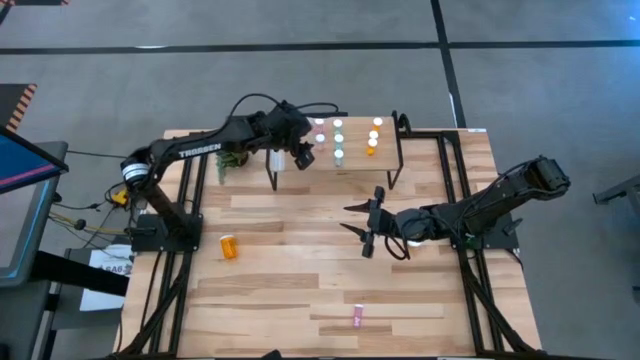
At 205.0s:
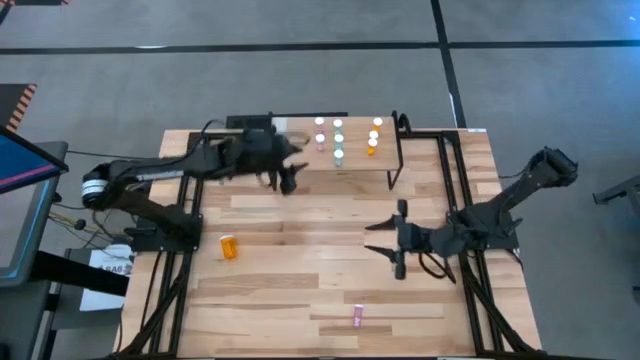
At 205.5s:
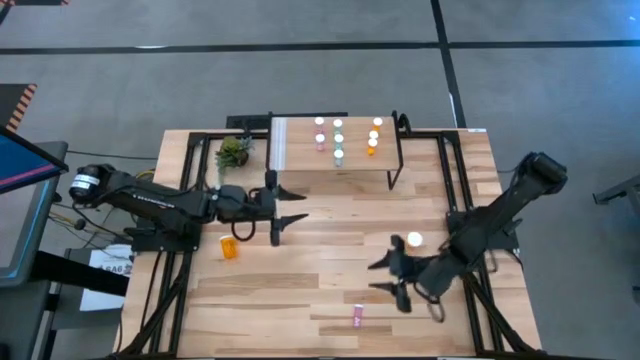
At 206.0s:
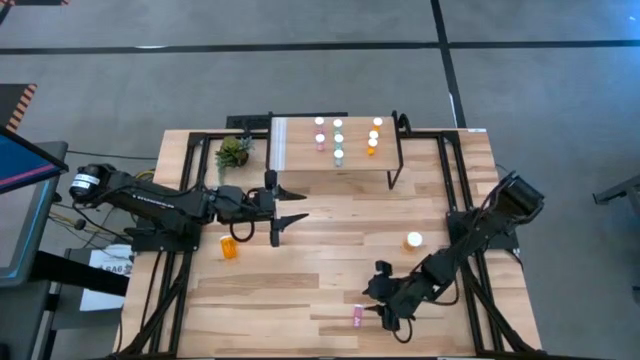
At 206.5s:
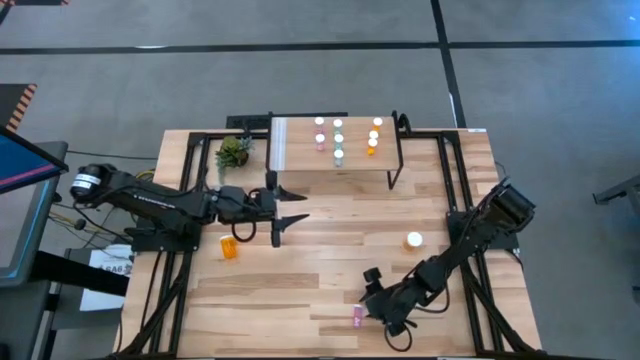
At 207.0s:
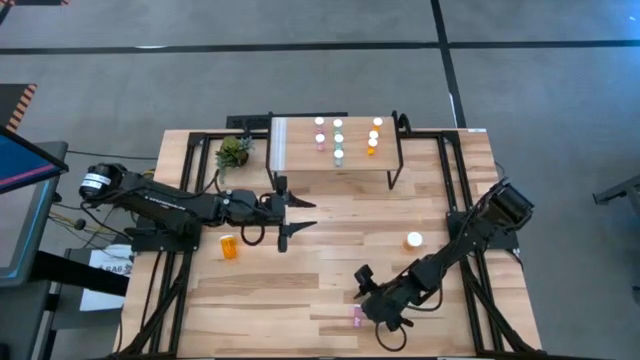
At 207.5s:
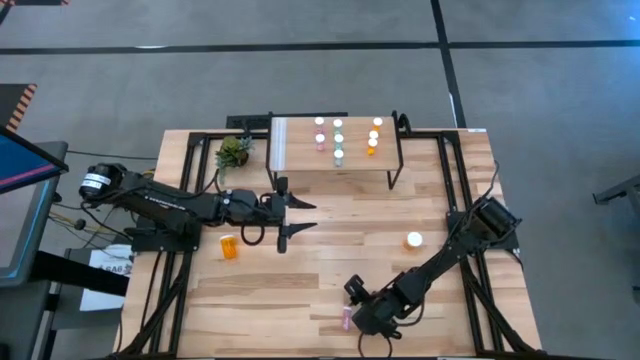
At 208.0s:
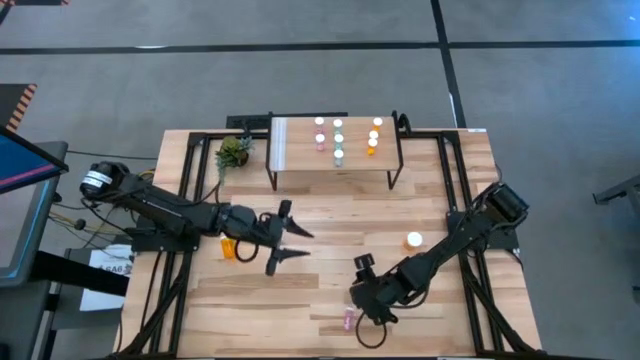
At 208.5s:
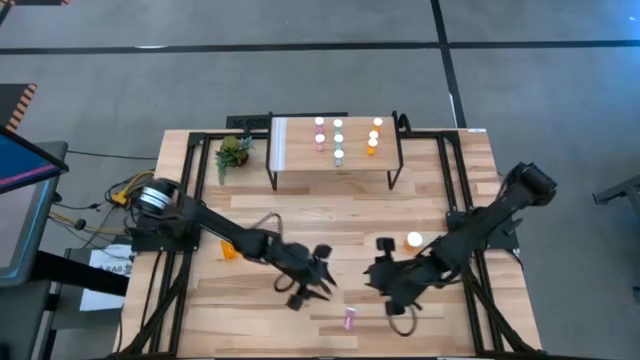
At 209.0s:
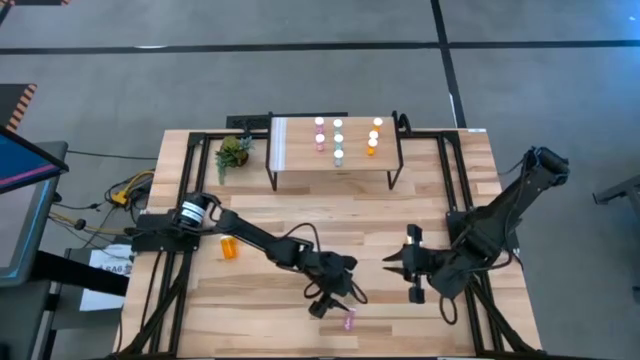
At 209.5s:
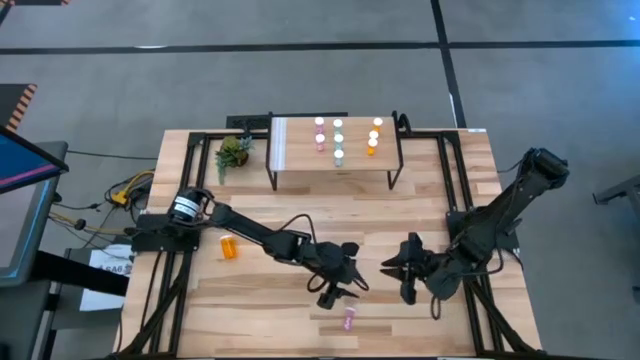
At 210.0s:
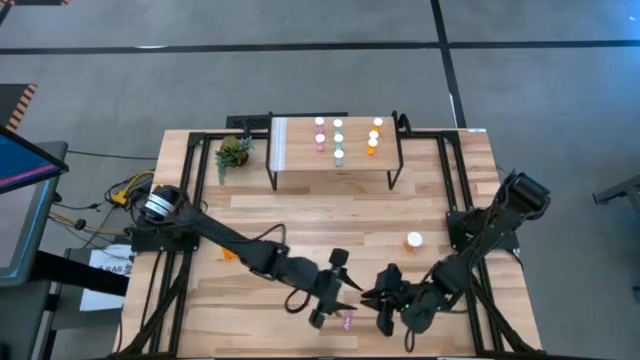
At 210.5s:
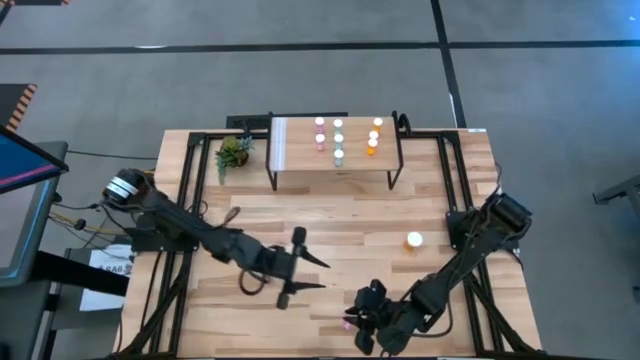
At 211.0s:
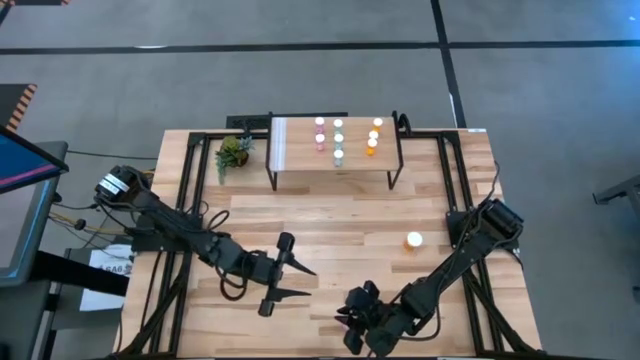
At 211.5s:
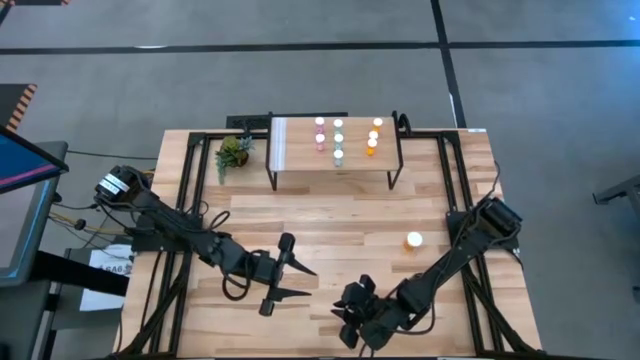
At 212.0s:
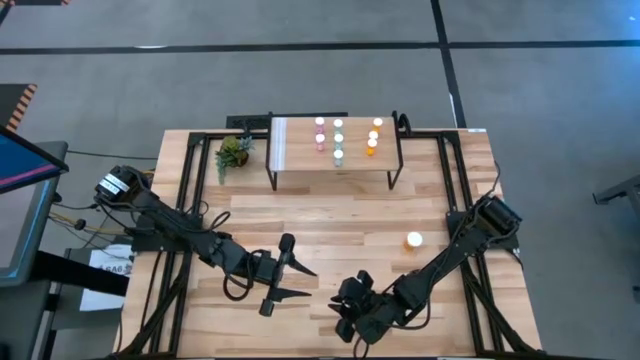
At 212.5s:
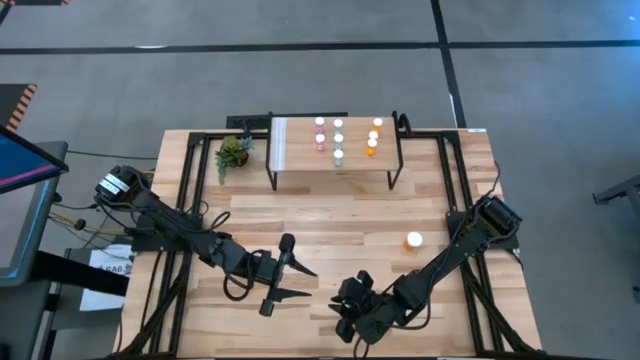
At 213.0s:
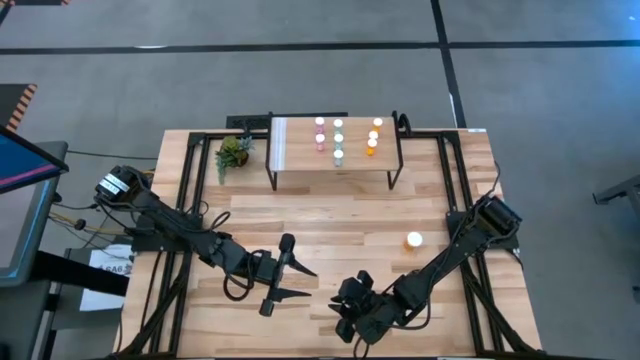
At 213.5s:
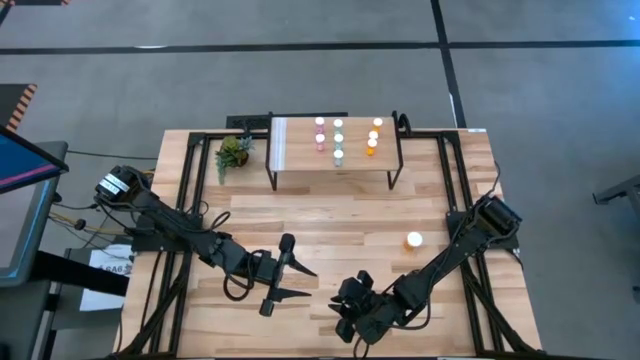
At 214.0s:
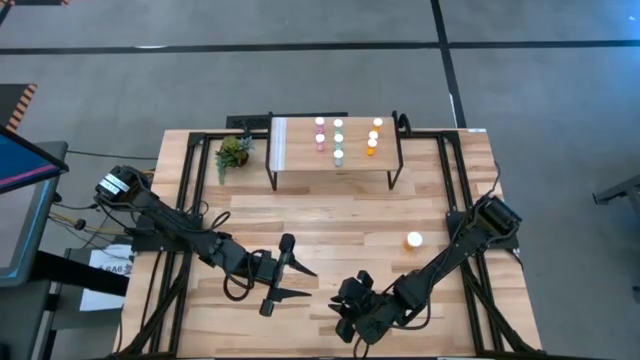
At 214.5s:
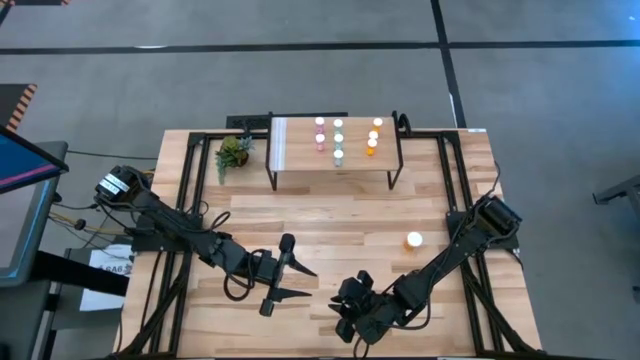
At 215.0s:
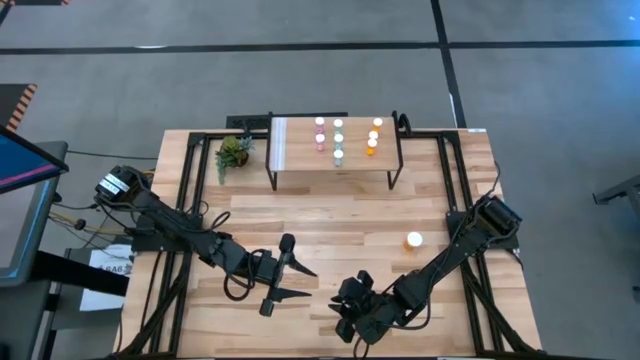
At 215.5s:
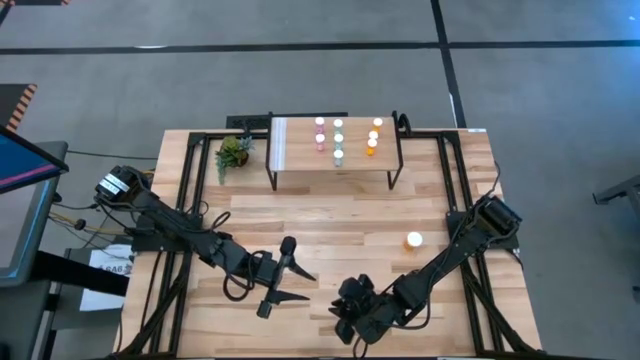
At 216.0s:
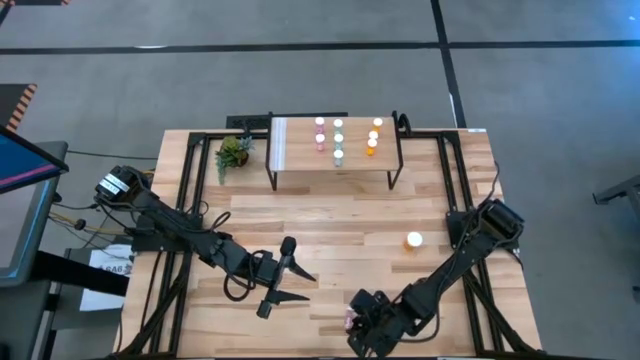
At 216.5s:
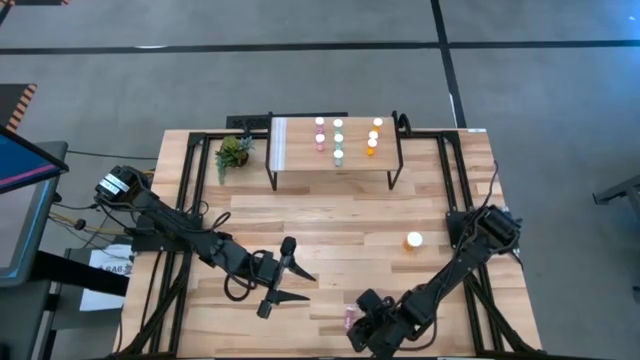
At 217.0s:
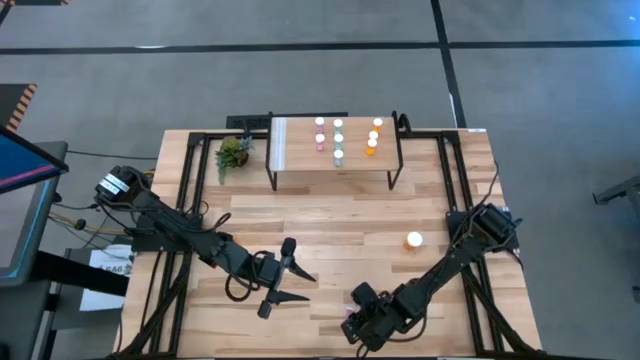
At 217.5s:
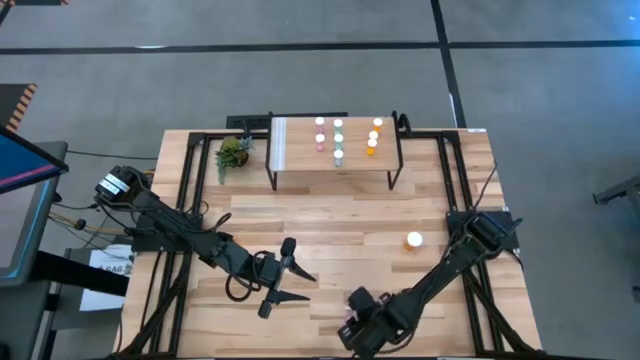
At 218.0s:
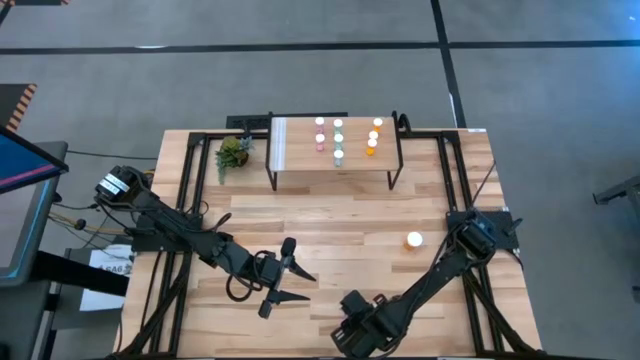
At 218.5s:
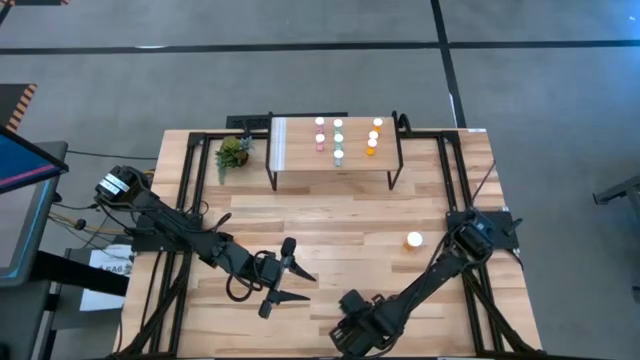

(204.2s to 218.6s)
Task: Pick and place medicine bottles onto shelf by color
Put the pink pill bottle on the shelf aligned with the other pink pill bottles

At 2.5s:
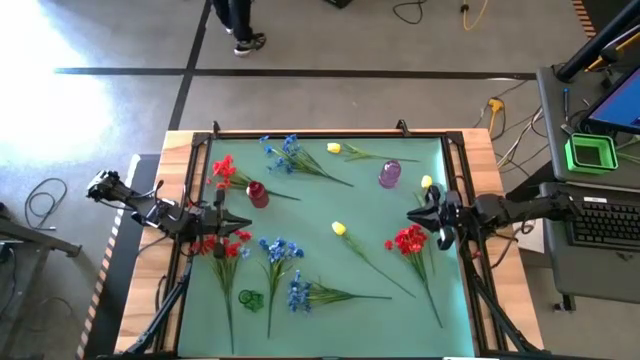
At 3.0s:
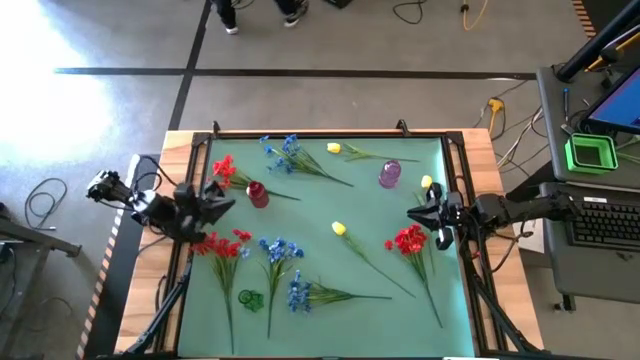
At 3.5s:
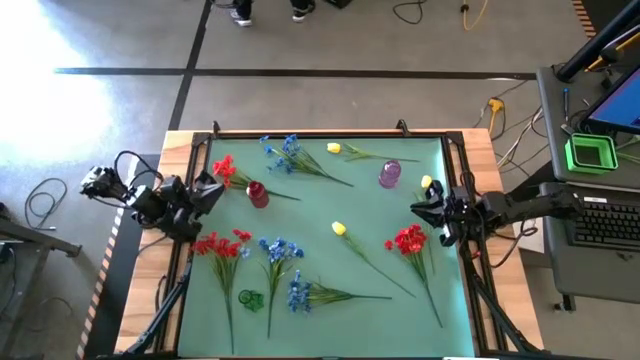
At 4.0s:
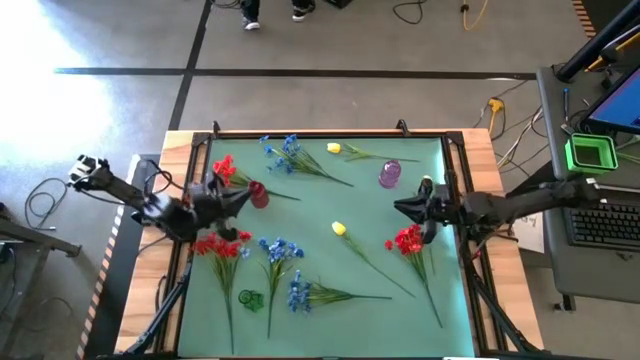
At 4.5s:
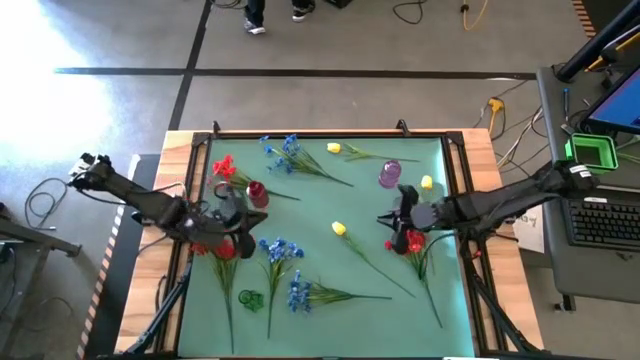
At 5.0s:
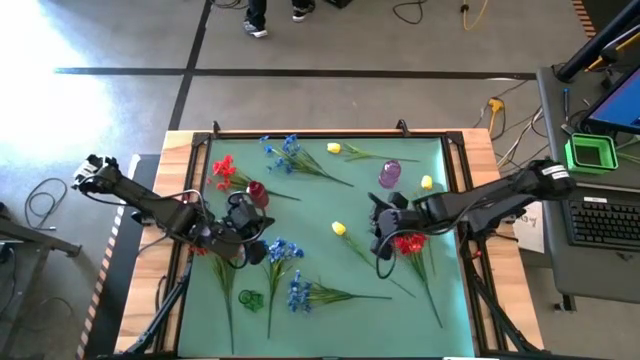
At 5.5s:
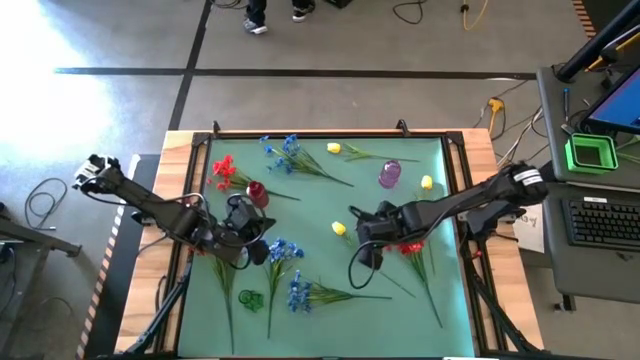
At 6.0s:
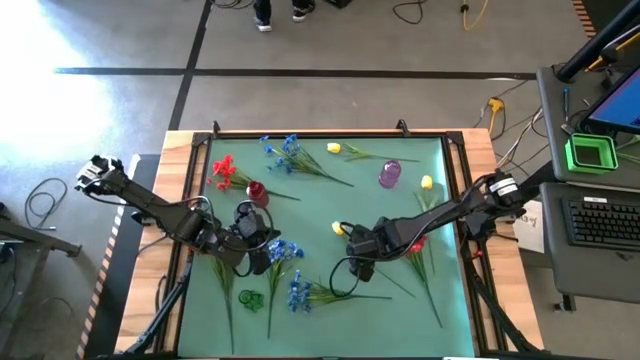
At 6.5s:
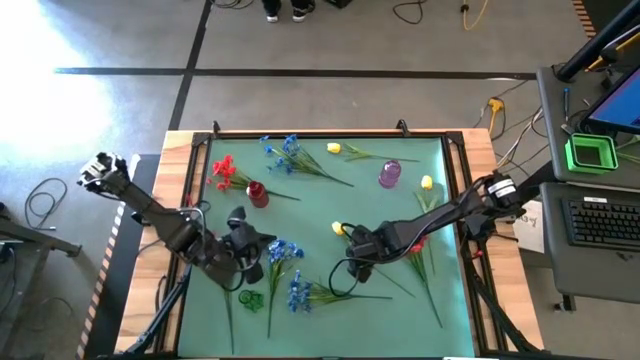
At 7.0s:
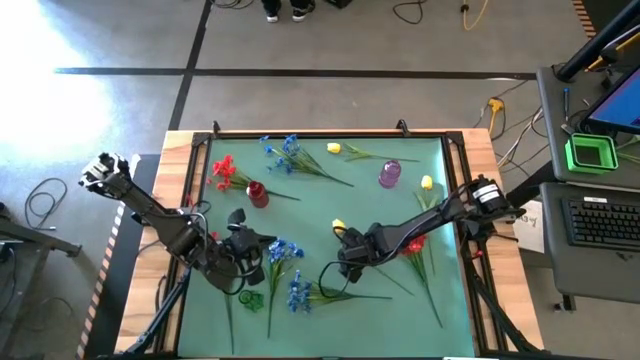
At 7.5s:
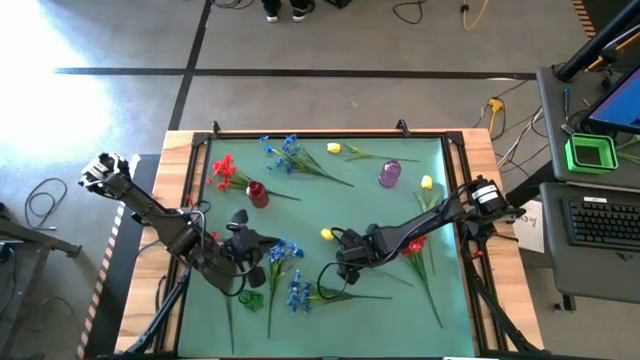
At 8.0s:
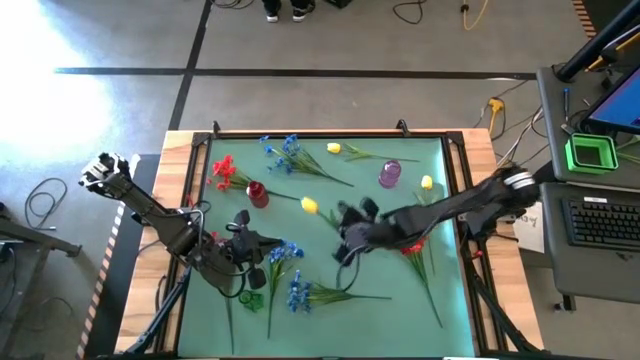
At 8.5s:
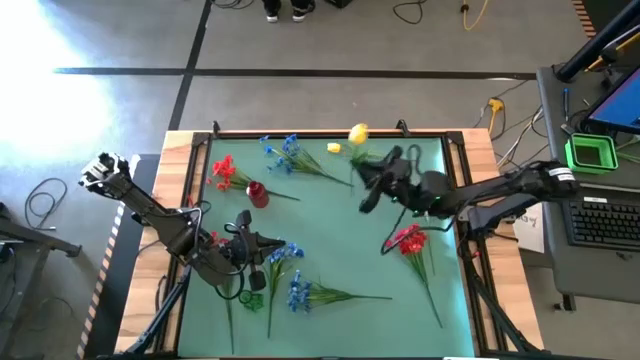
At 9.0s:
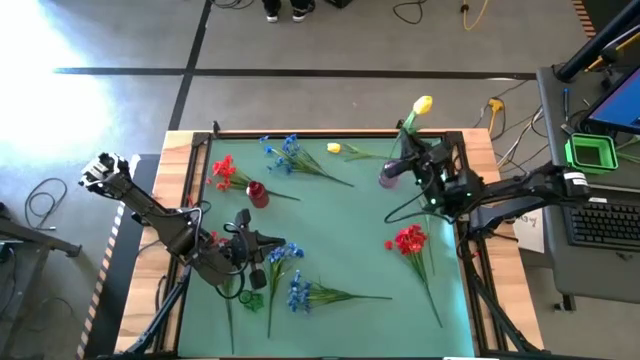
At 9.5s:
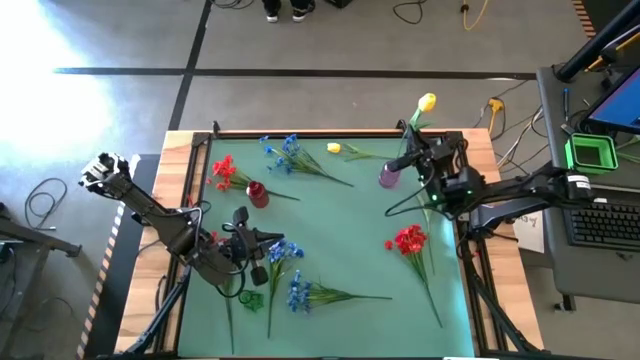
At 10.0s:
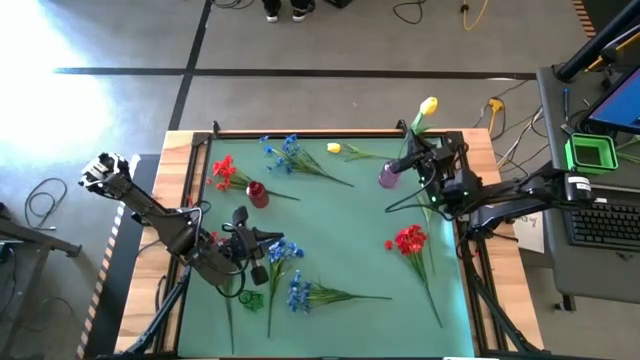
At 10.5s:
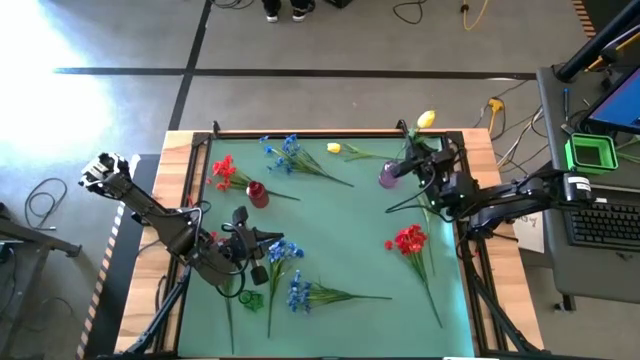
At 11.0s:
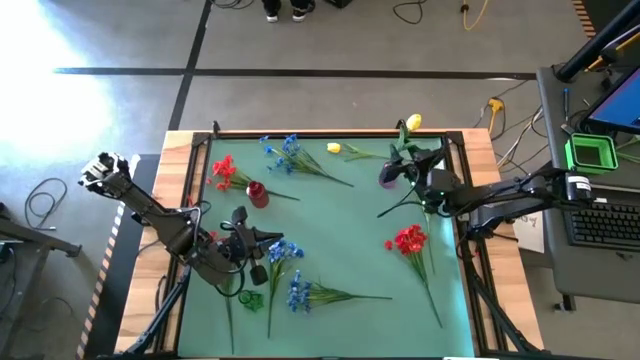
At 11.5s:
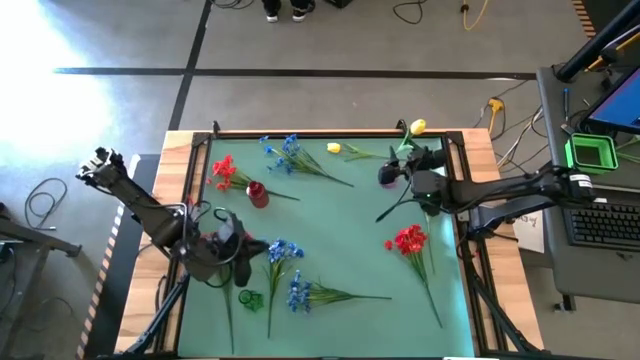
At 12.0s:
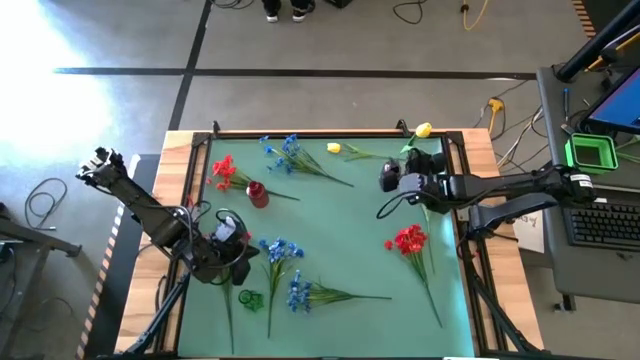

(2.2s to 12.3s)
Task: Sort flowers into vase by color
Put the bottom yellow tulip into the purple vase
